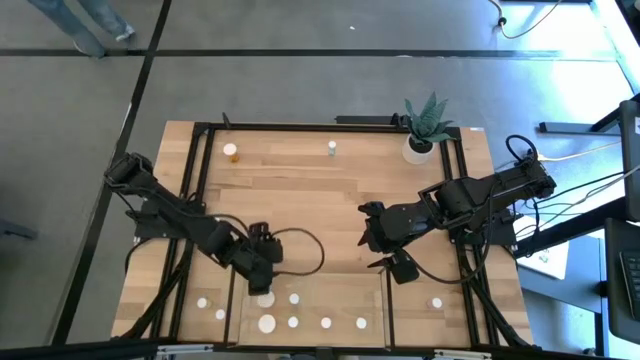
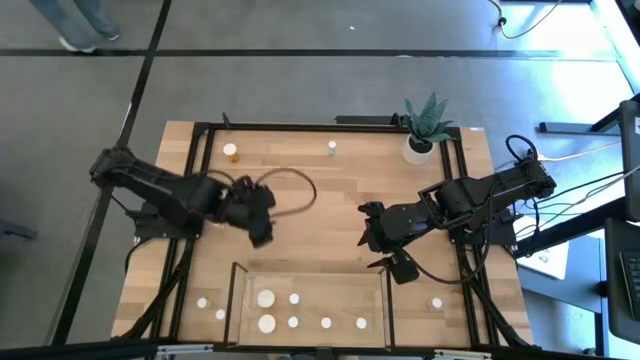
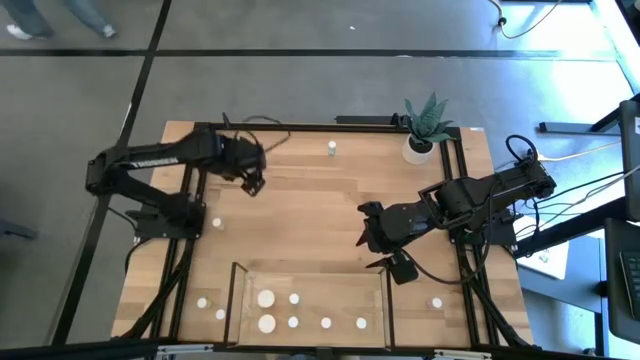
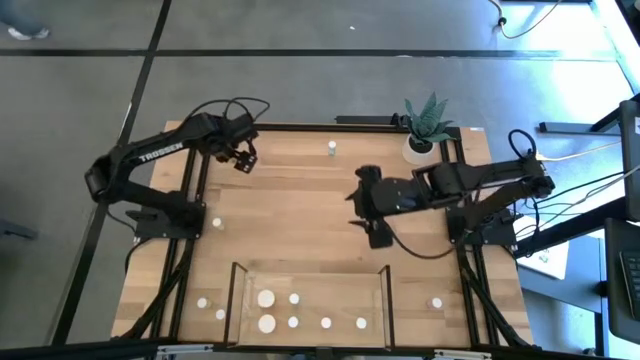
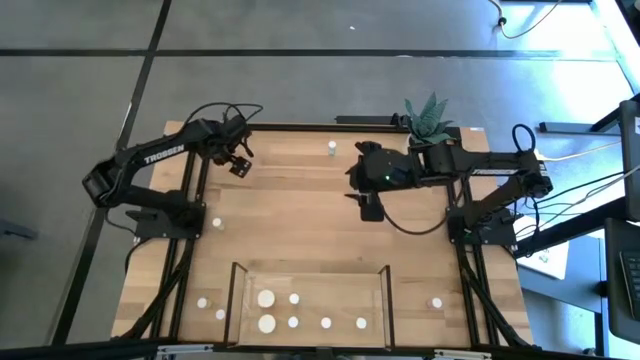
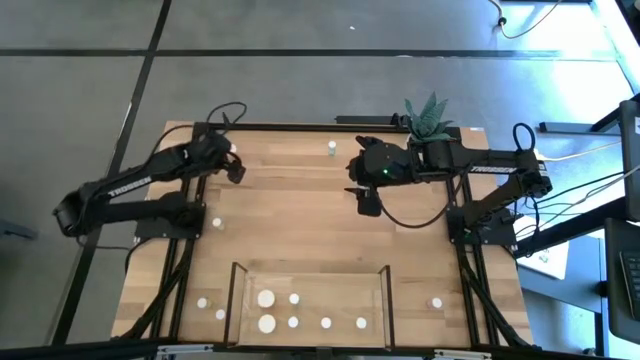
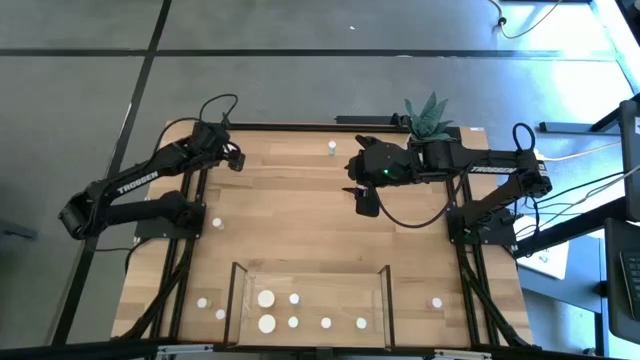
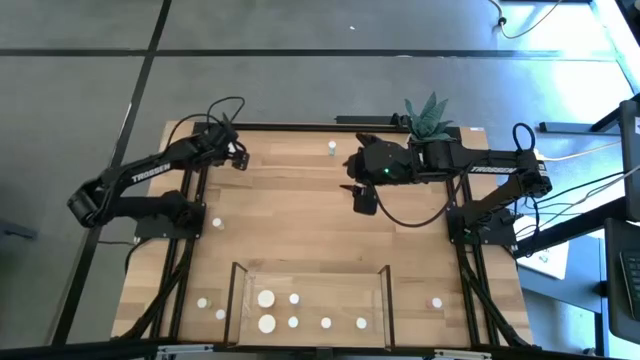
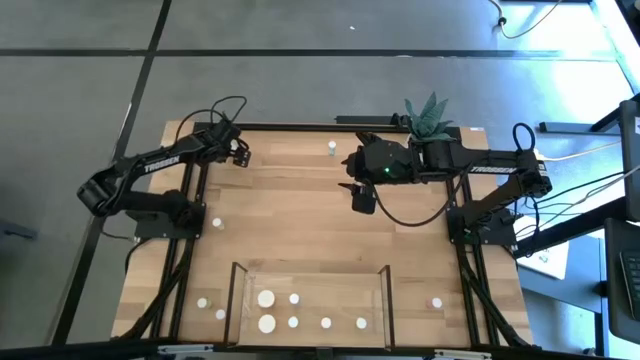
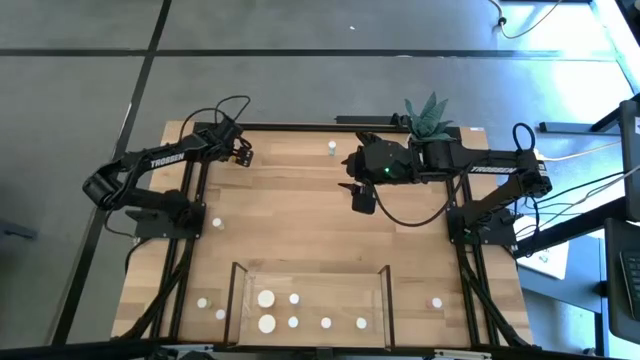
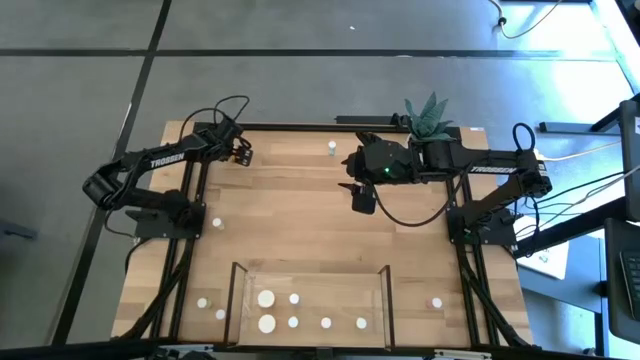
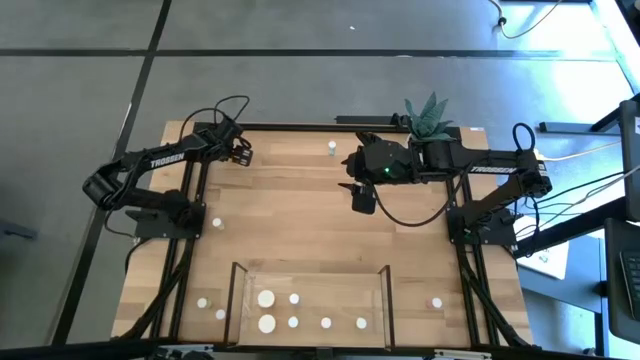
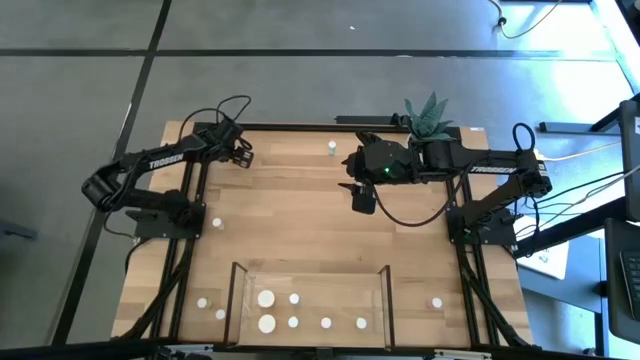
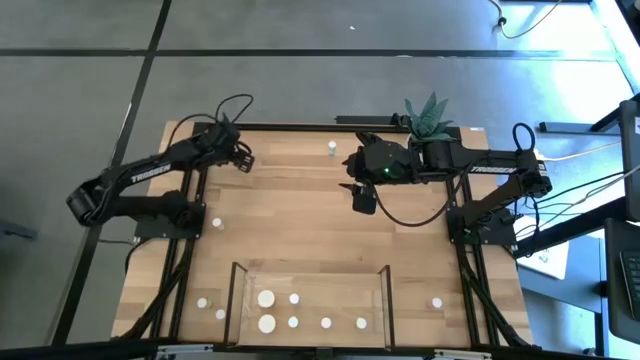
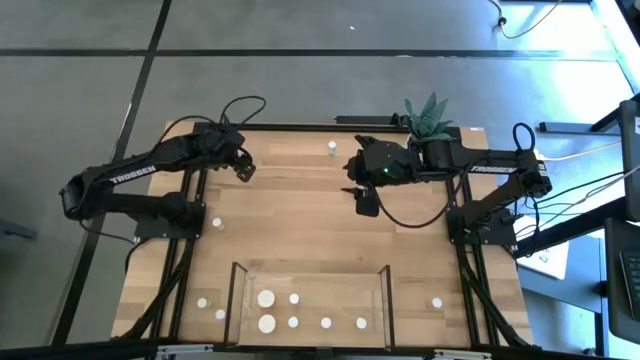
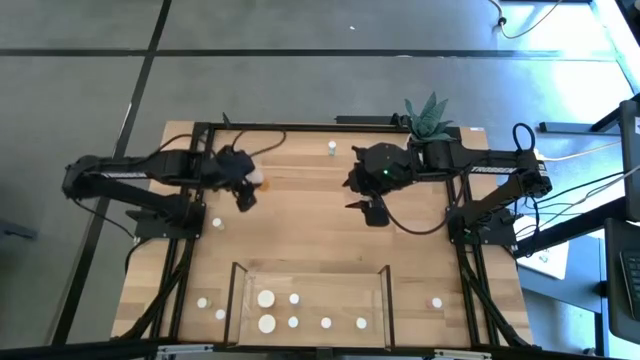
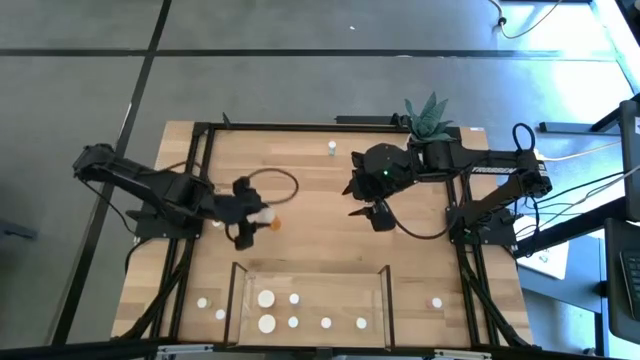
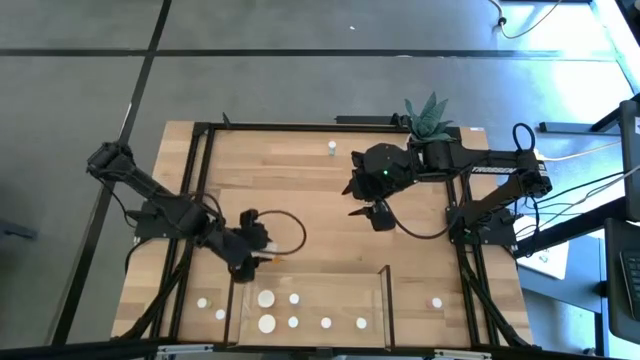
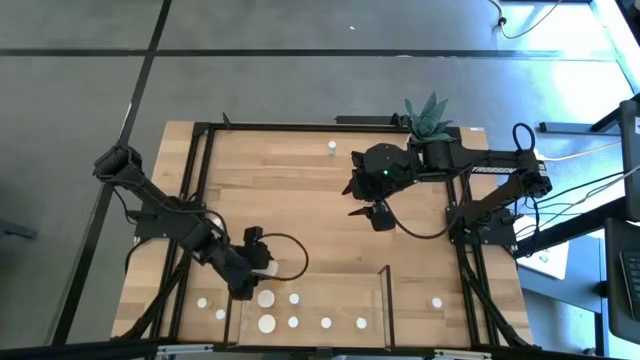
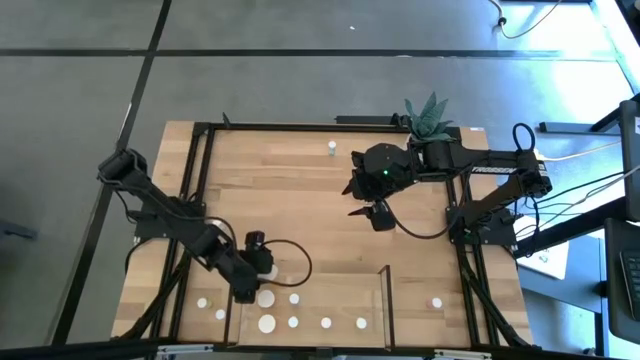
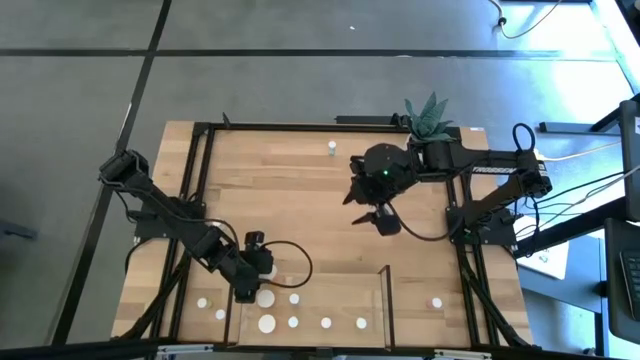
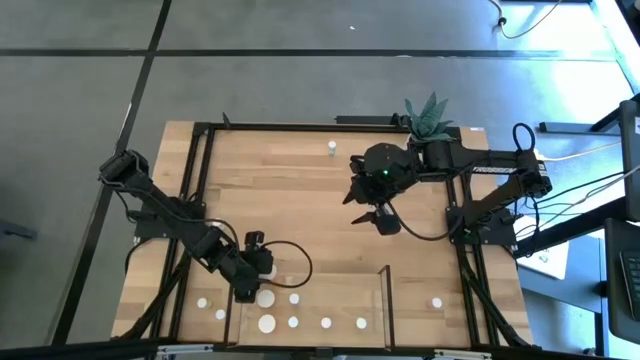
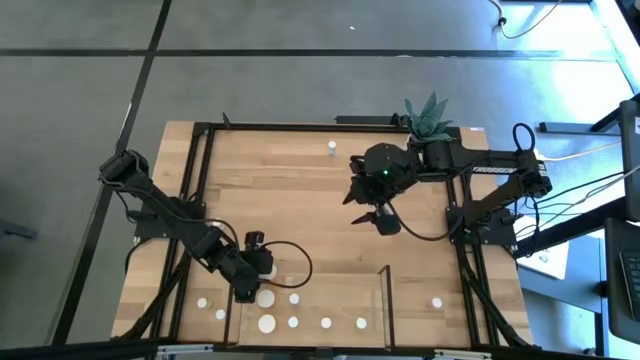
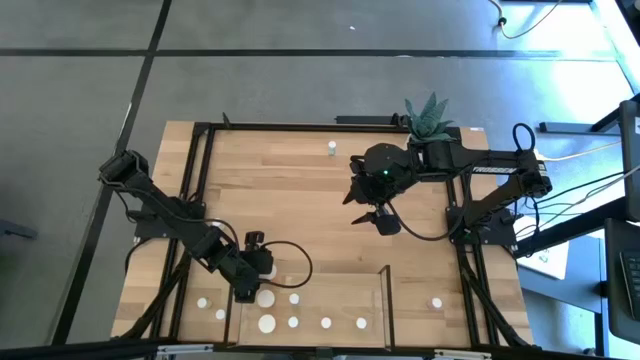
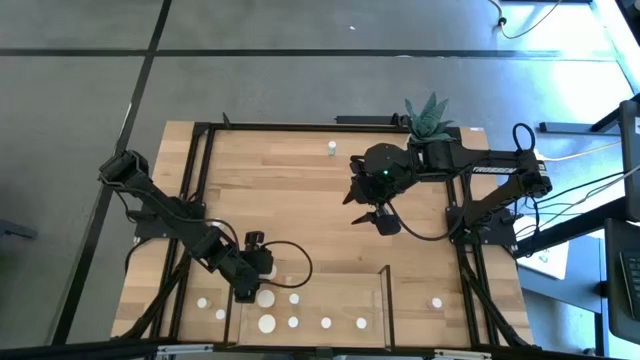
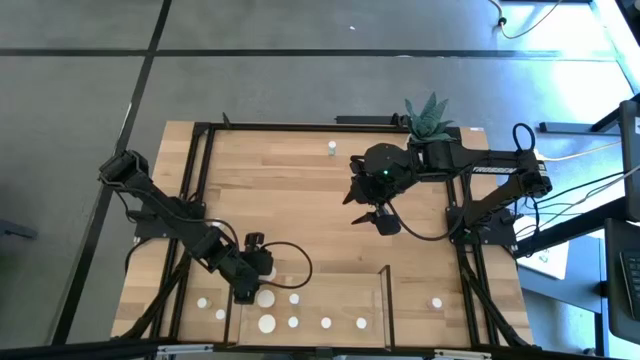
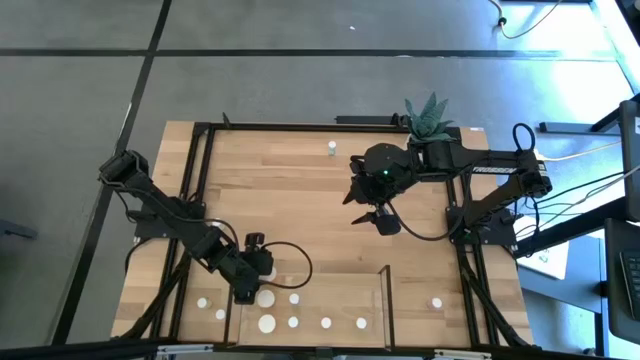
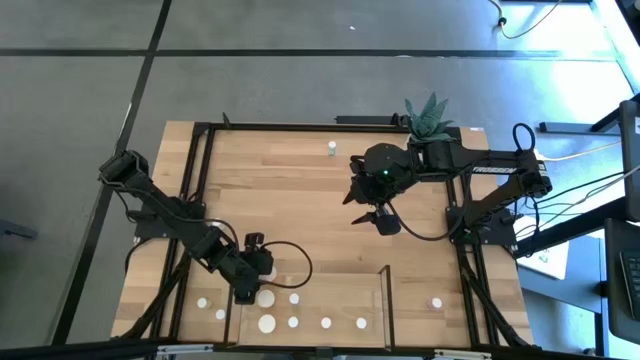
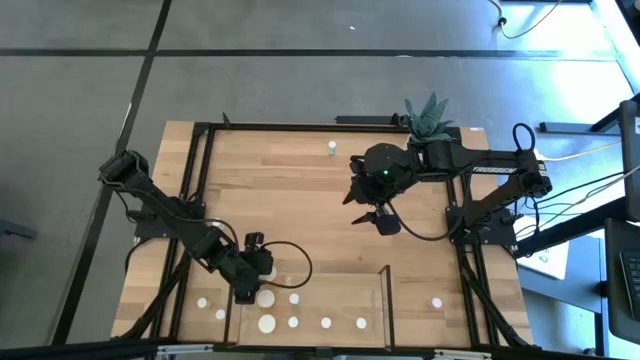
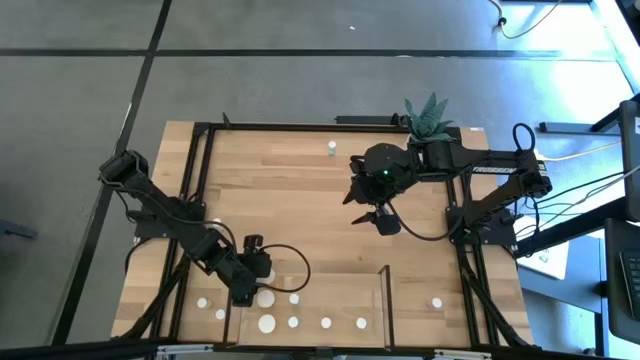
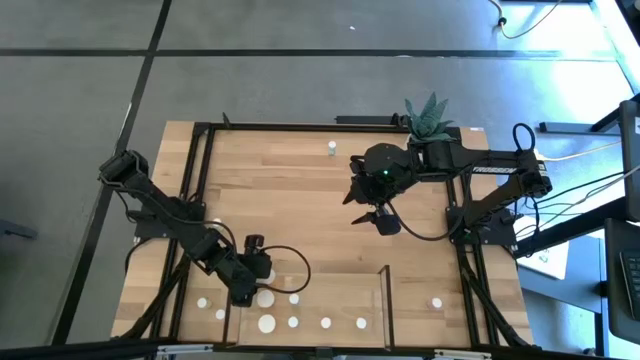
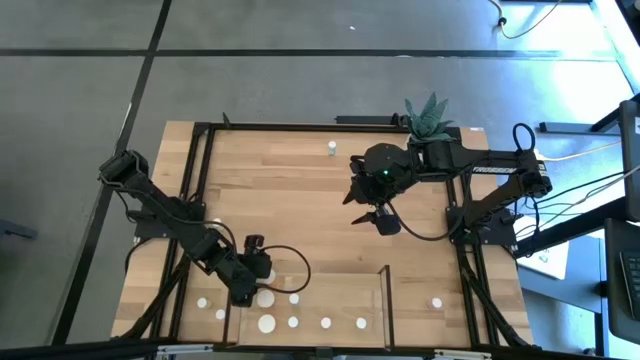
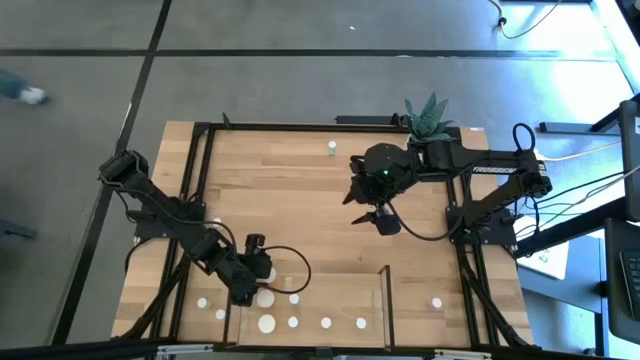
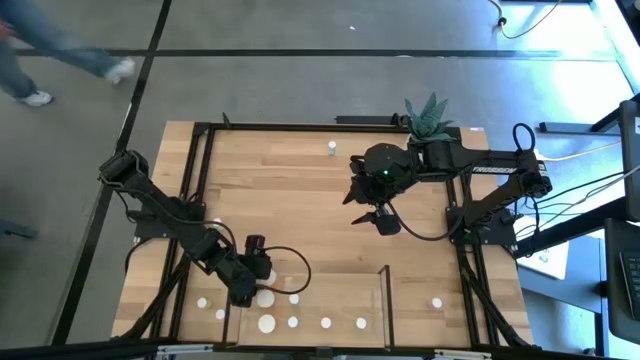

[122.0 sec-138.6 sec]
Task: Pick and place medicine bottles onto shelf by color
Put the orange pill bottle on the shelf aligned with the other orange pill bottles

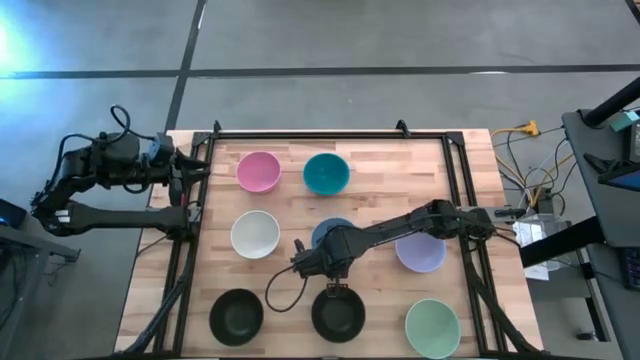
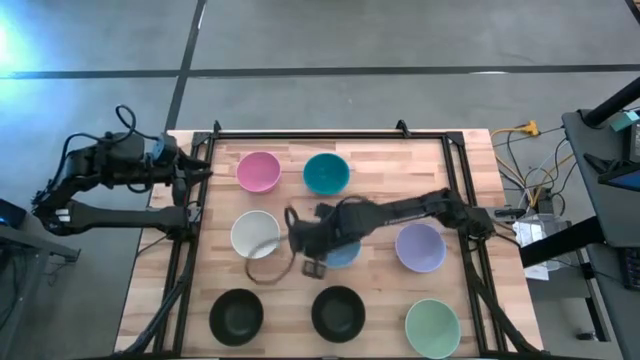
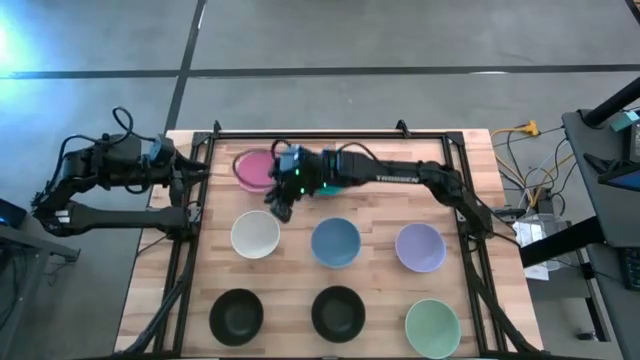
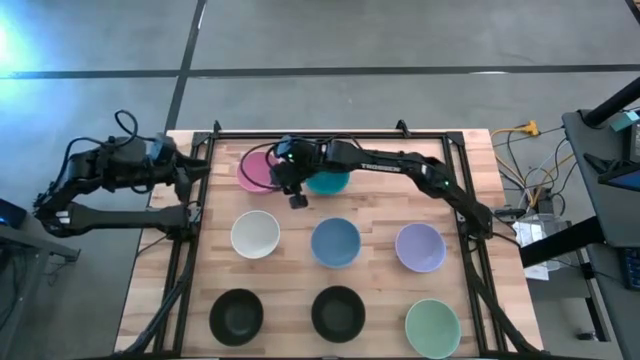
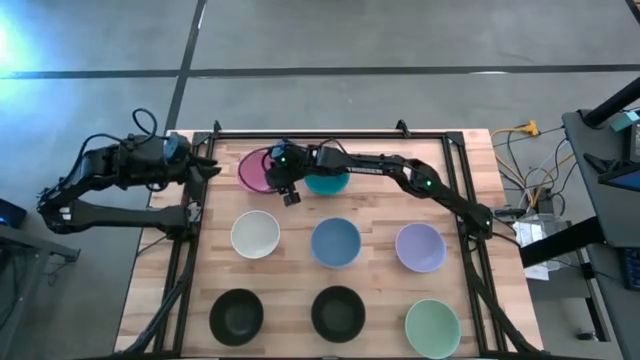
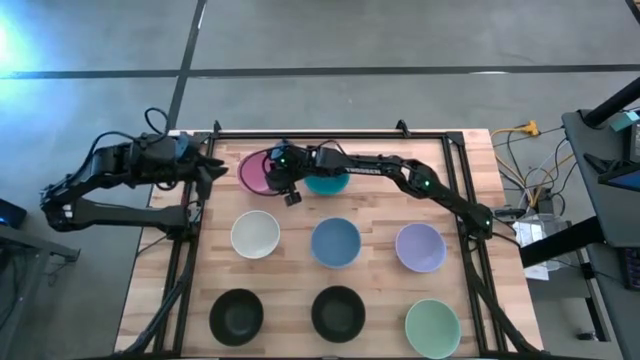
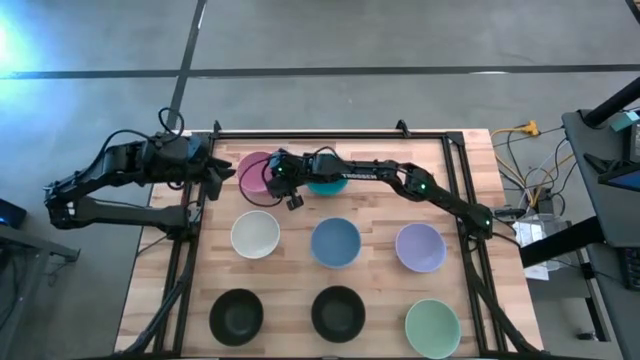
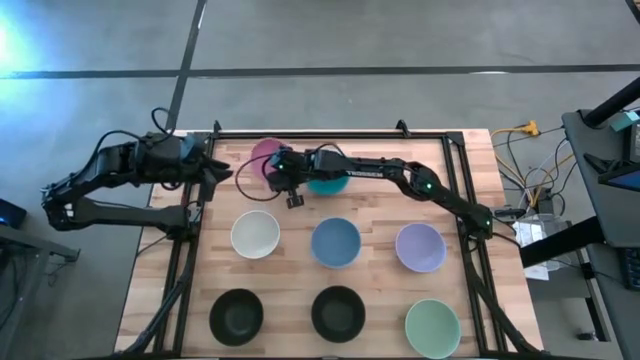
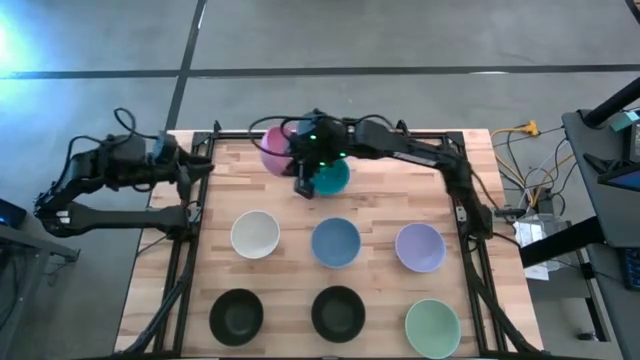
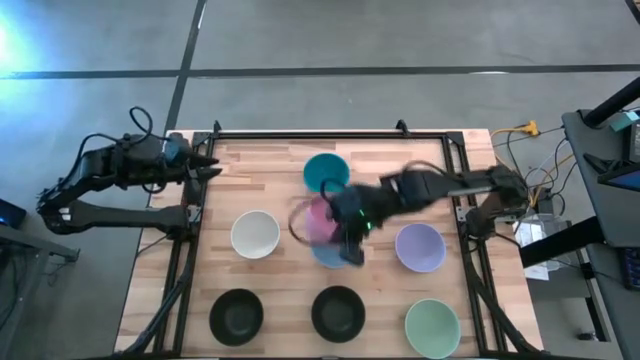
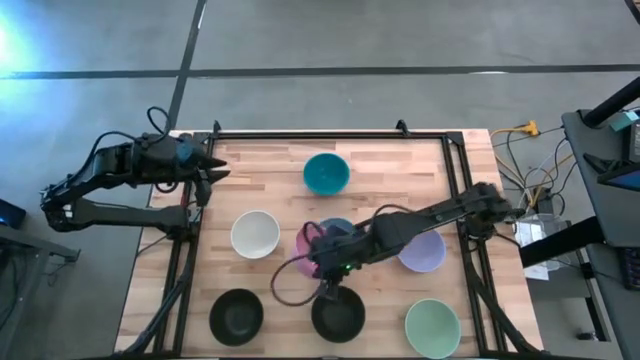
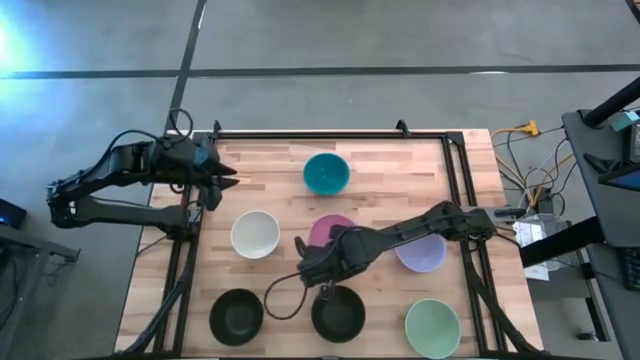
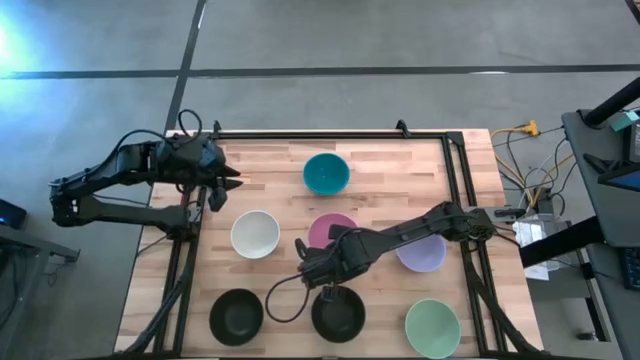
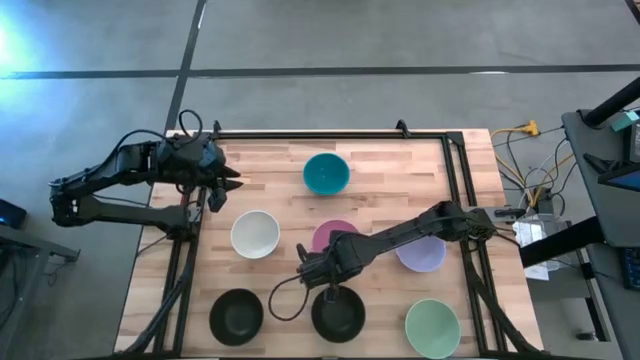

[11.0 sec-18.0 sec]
Task: Nest bowls inside each other
Stack the pink bowl on top of the light blue bowl
